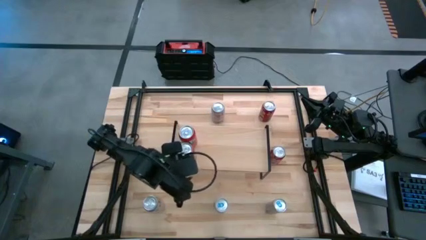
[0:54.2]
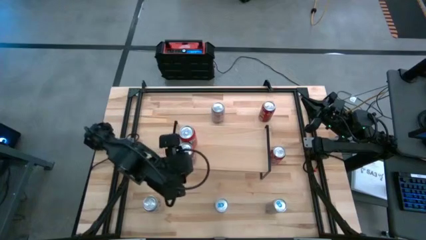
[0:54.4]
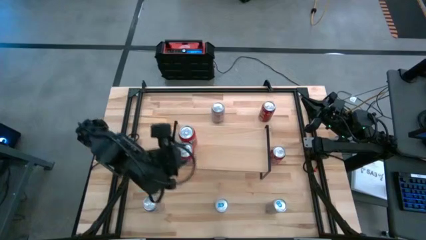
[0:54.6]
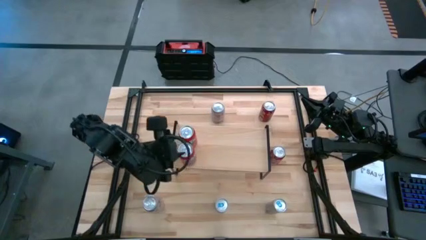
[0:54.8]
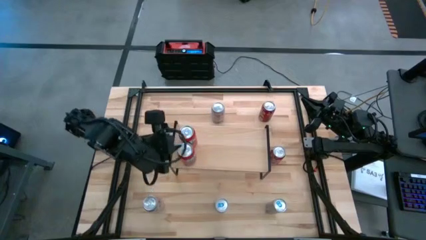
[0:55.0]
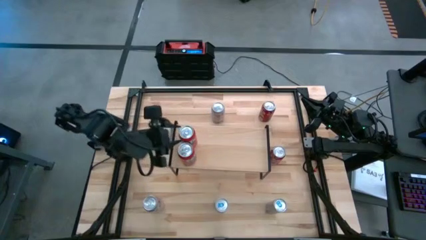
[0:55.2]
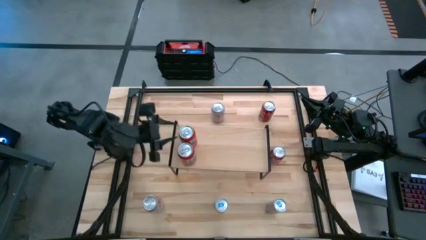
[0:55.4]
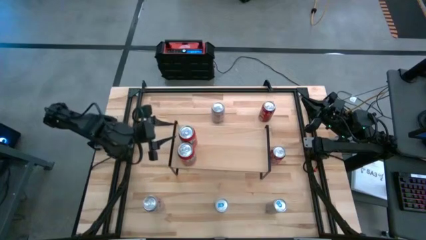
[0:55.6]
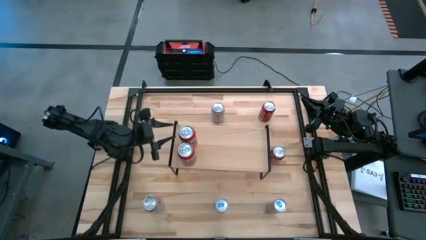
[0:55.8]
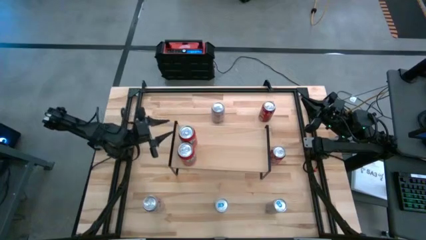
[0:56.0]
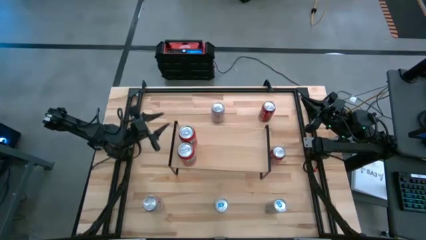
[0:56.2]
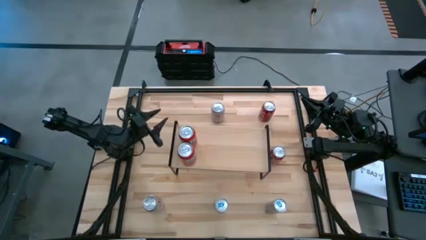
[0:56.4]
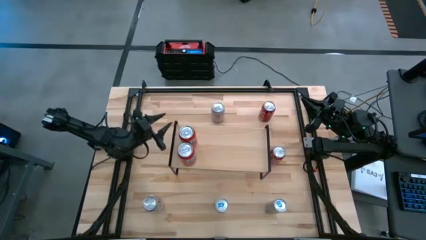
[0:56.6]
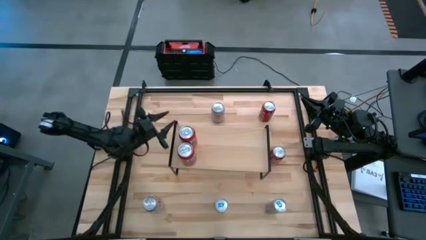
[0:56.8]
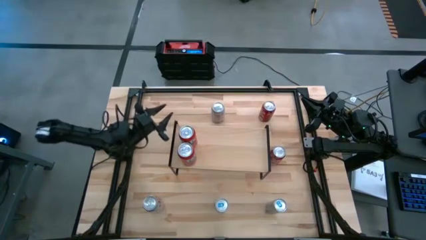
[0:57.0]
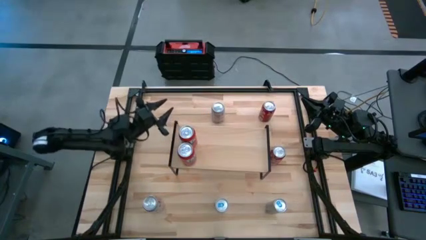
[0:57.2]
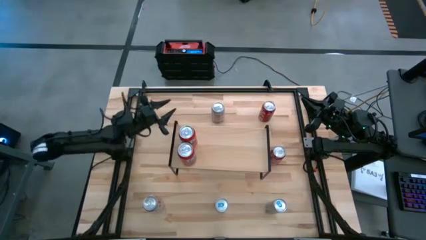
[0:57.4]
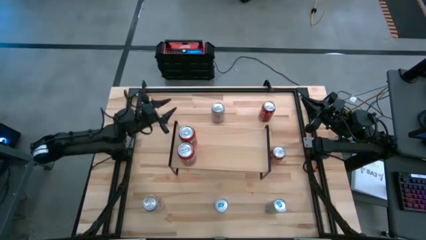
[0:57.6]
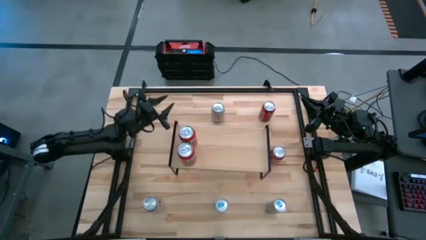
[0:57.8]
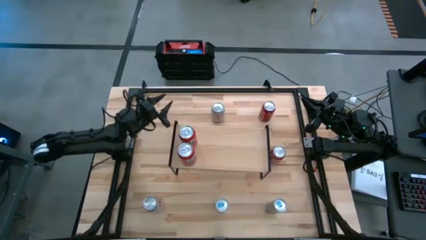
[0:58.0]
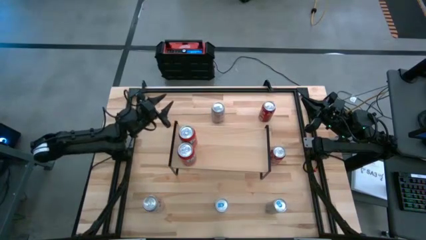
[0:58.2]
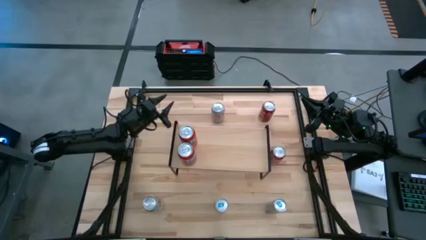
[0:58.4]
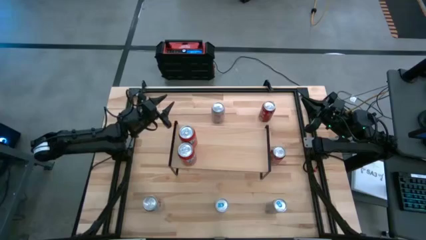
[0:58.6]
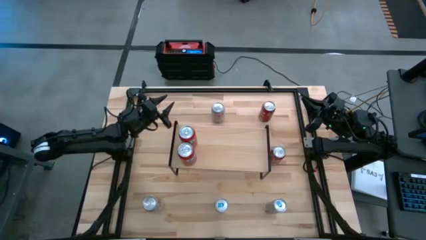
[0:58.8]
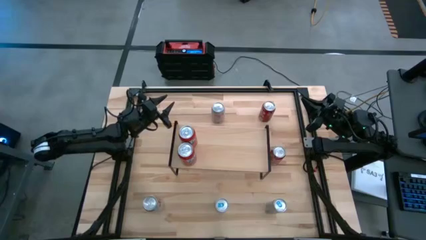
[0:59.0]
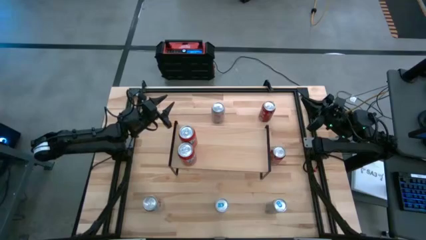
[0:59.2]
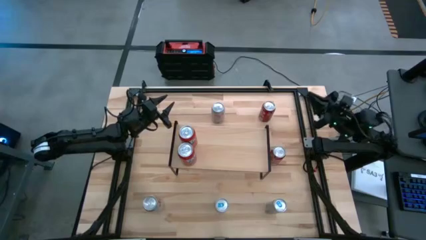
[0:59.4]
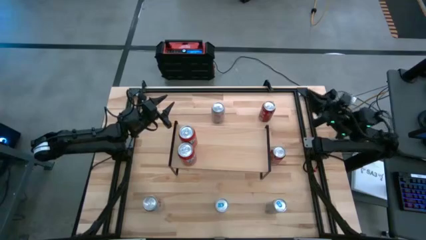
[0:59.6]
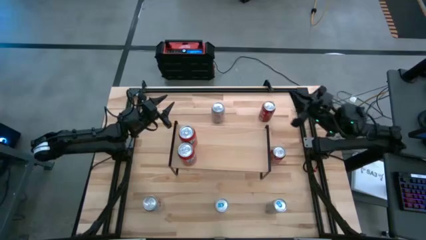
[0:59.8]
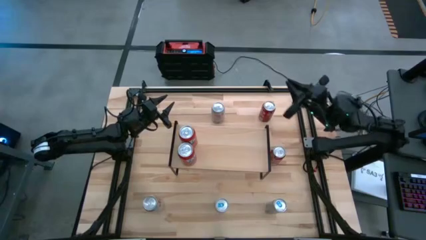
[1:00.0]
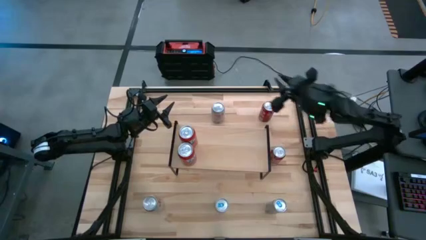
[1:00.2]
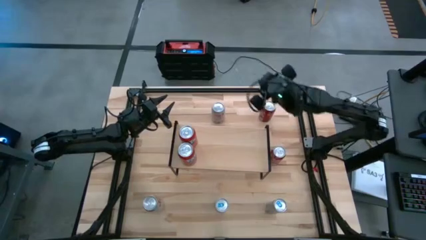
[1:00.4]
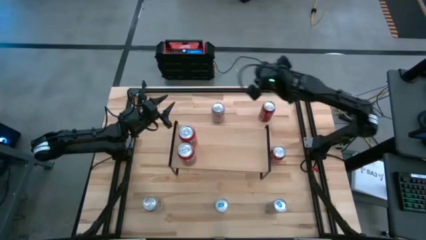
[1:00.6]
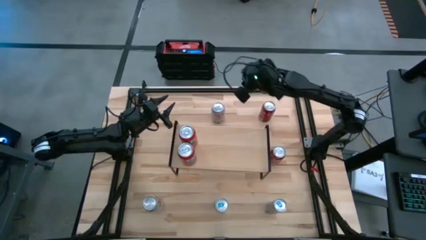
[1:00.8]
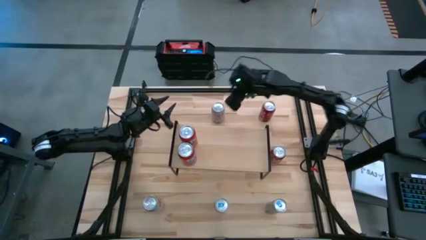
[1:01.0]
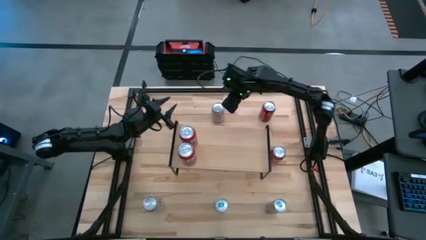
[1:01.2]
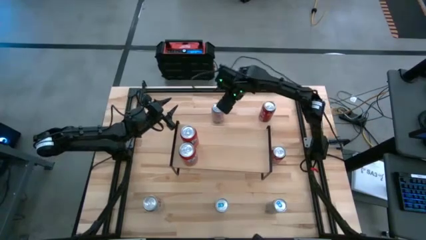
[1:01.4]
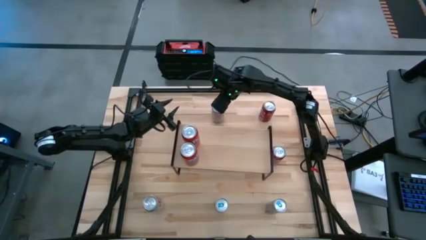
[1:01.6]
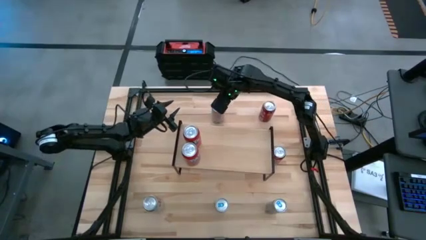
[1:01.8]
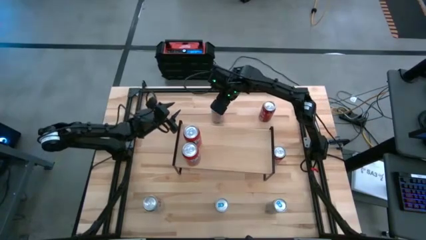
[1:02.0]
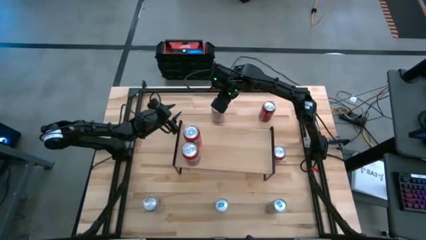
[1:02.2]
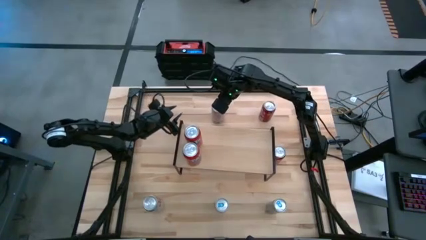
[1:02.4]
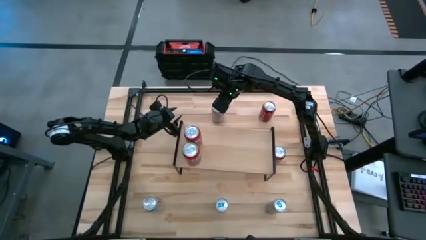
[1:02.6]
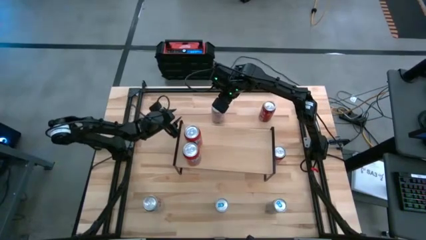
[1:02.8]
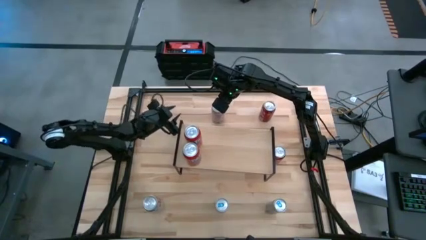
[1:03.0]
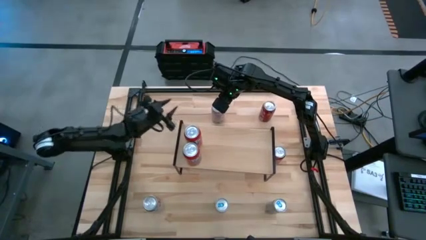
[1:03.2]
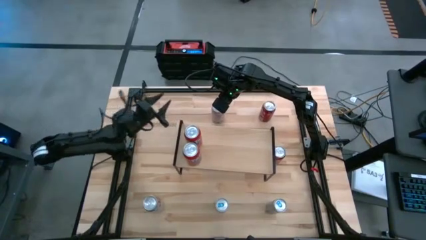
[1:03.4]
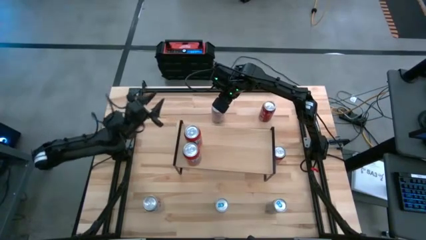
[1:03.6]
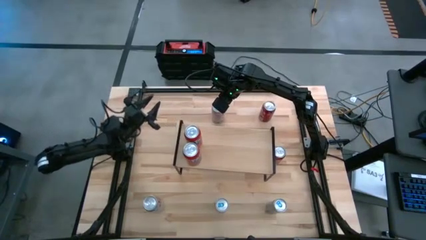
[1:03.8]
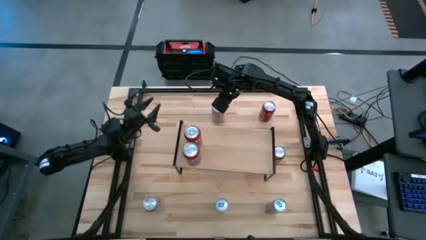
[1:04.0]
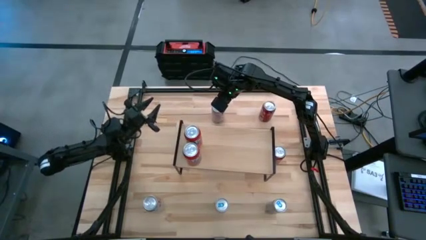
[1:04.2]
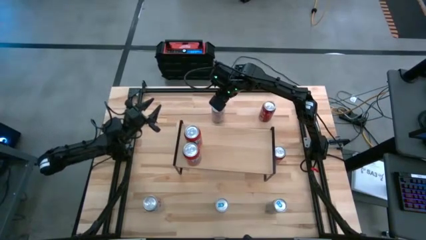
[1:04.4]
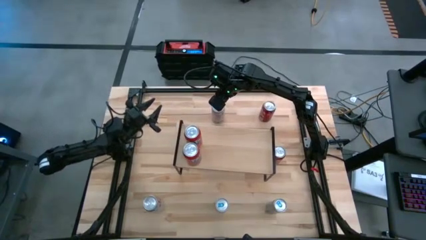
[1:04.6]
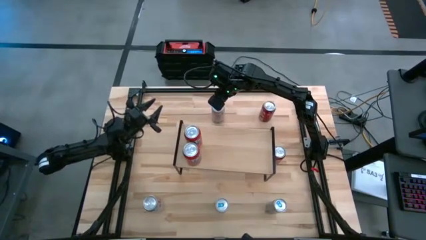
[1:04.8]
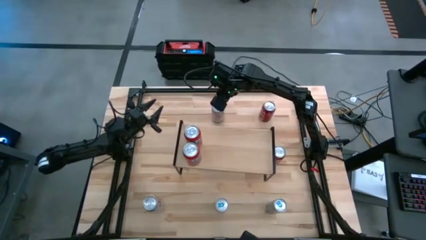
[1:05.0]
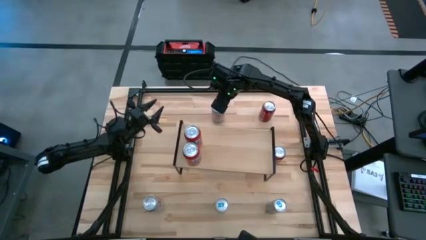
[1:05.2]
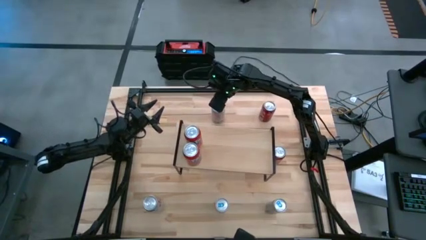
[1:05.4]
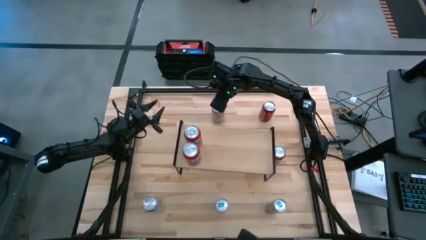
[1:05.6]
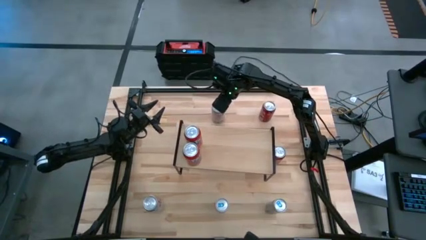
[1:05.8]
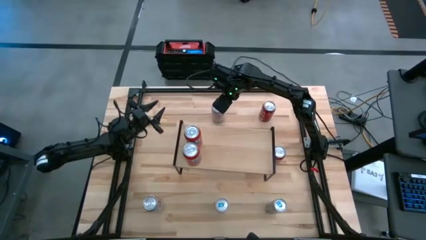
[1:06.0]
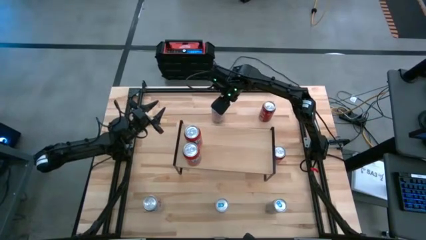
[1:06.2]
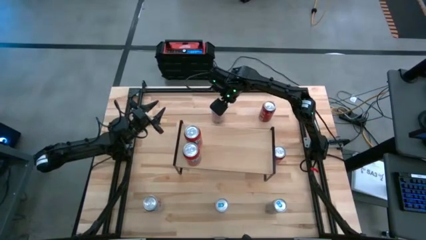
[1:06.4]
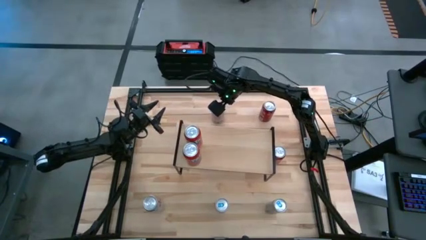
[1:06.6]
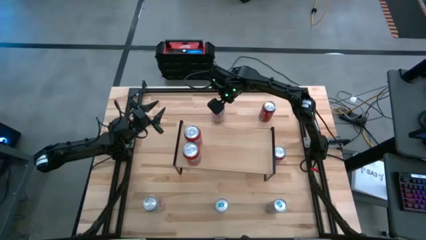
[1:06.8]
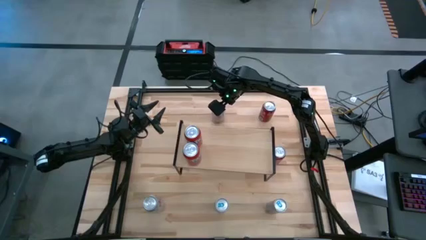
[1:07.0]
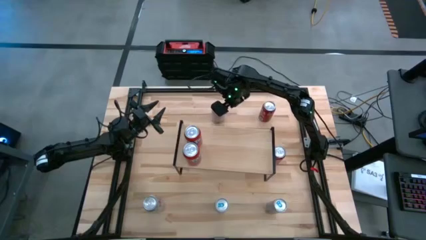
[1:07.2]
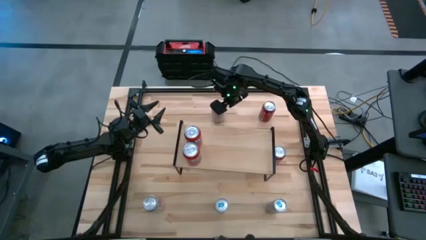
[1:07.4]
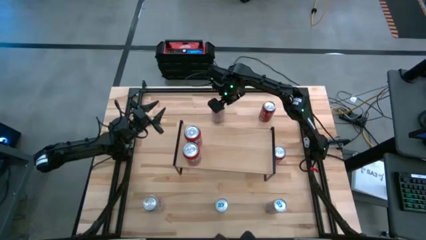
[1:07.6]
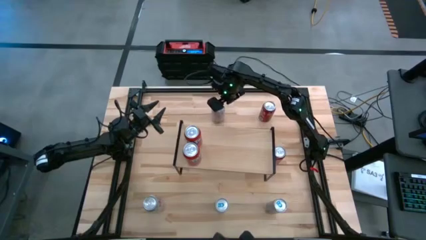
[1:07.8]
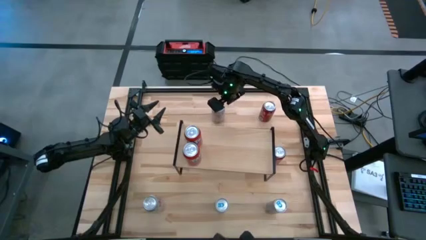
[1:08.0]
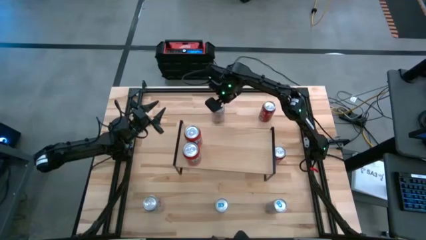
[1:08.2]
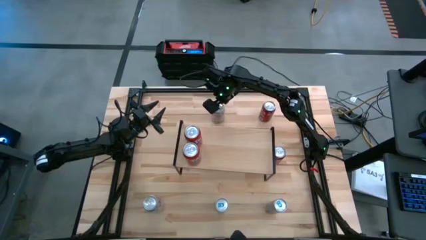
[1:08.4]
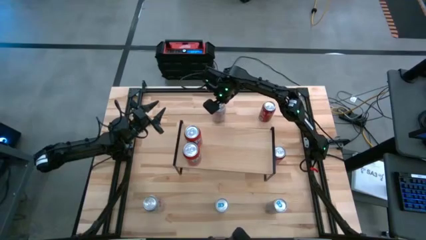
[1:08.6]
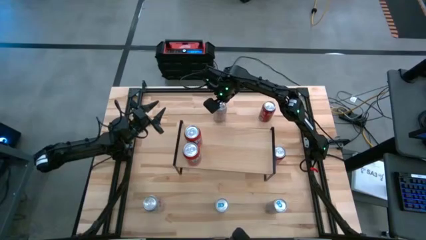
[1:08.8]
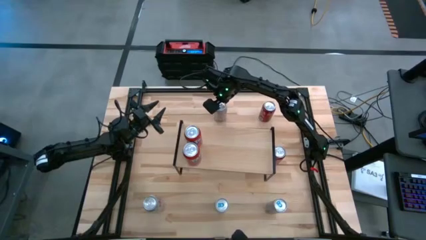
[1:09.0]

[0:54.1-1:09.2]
Task: Place canned beverage on shelf
Put the top silver soda can on the shelf

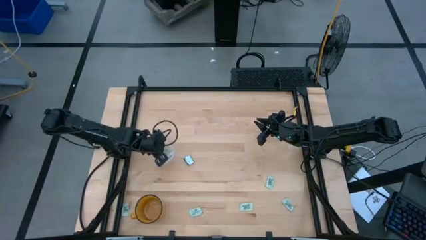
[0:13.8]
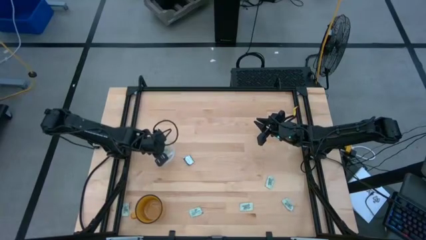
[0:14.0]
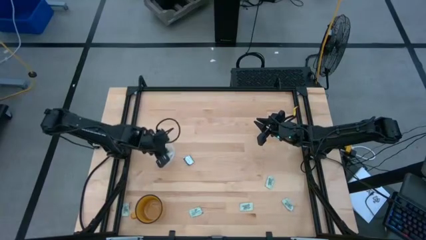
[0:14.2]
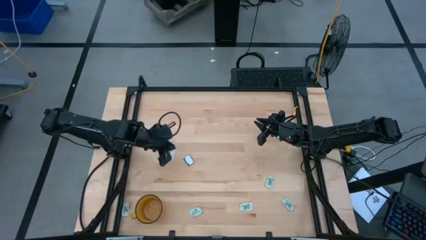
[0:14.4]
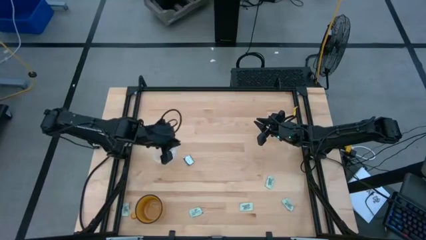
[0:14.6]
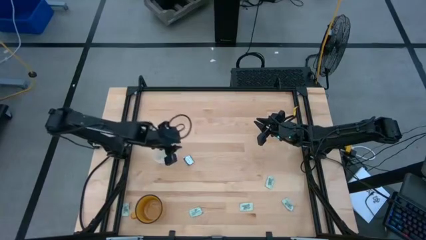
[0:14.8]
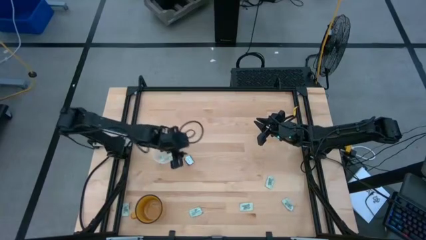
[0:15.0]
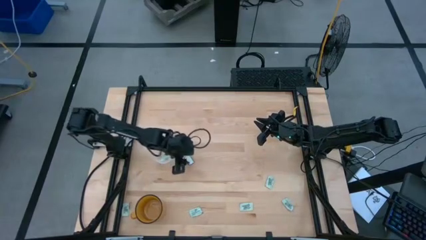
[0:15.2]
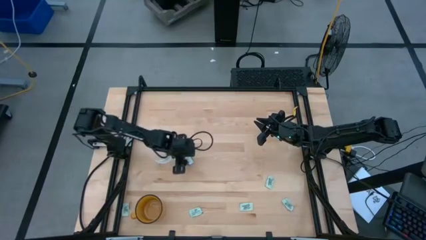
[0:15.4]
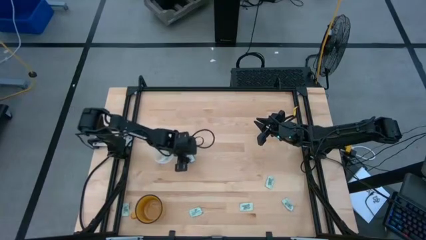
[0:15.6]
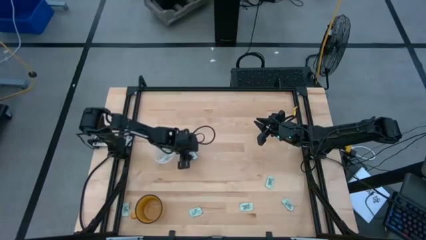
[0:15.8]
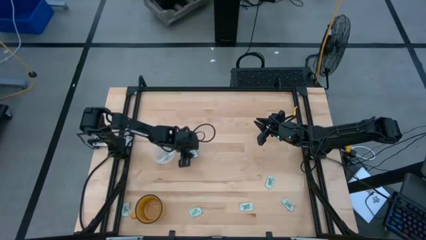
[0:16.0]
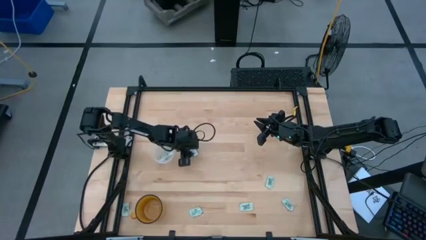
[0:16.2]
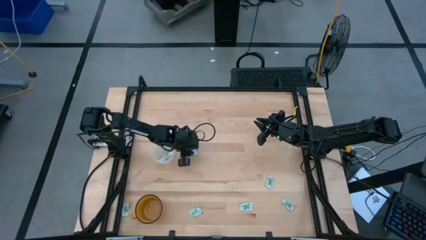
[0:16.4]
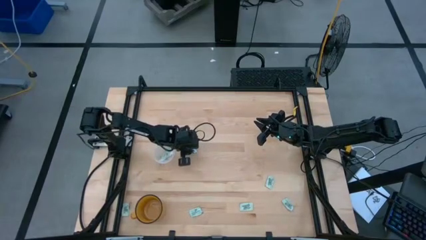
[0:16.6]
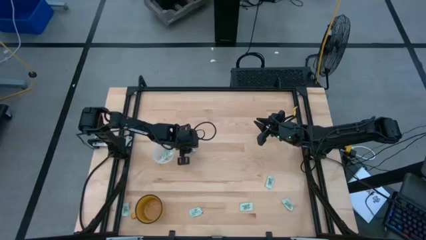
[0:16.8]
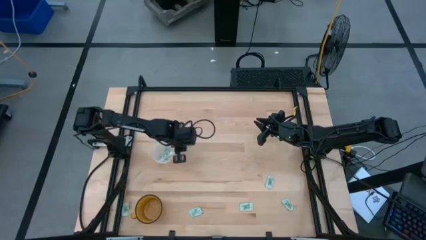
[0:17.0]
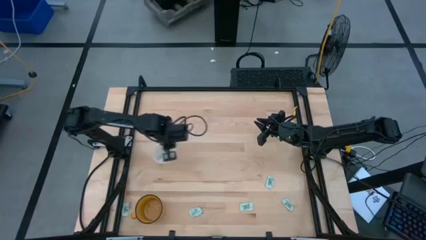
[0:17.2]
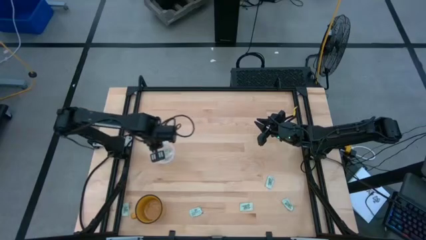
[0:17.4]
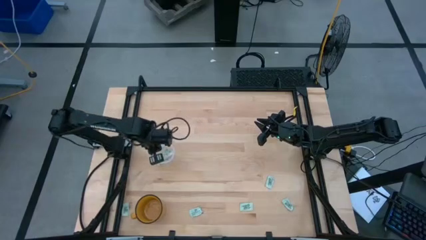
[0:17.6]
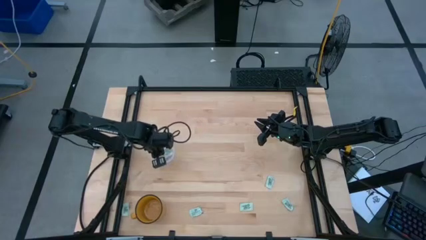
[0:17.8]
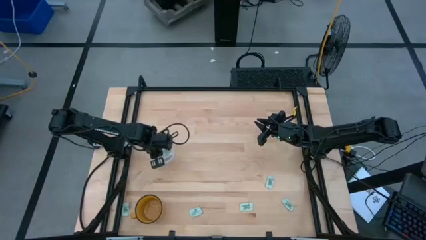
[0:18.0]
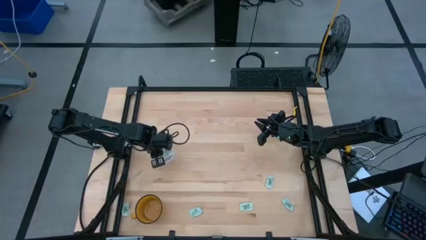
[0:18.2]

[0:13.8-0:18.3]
Task: Pick and place items into bin
Put the dark green truvia packet into the left transparent bin
